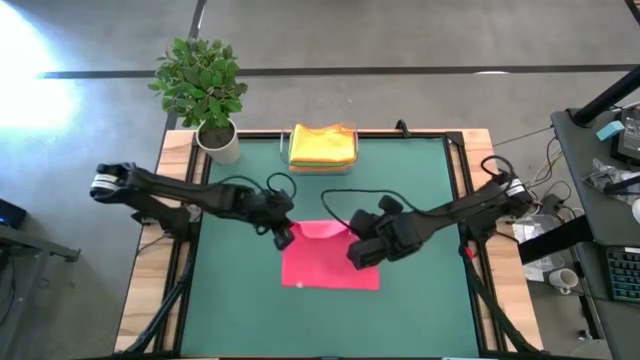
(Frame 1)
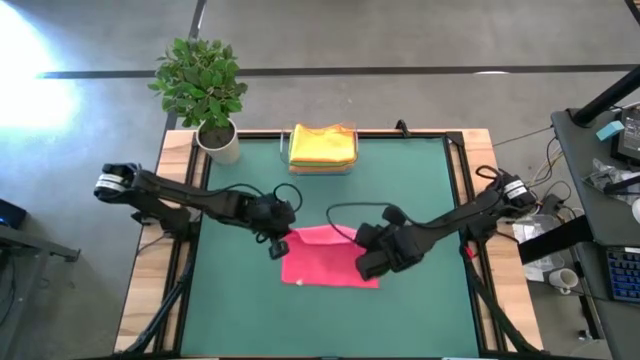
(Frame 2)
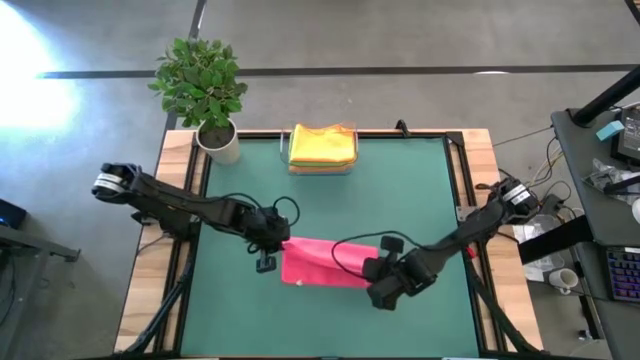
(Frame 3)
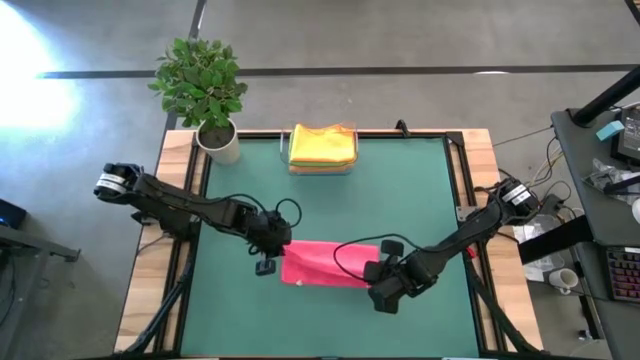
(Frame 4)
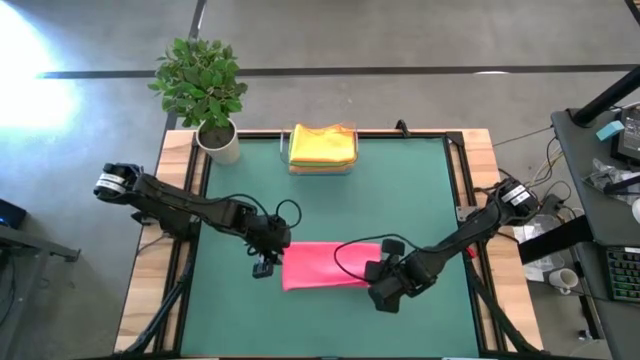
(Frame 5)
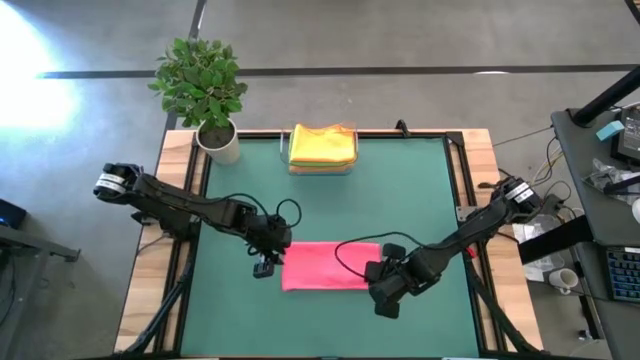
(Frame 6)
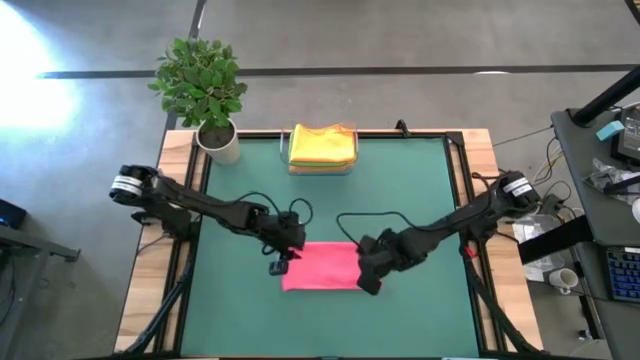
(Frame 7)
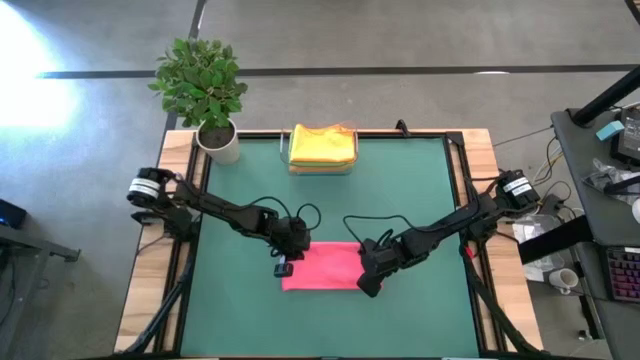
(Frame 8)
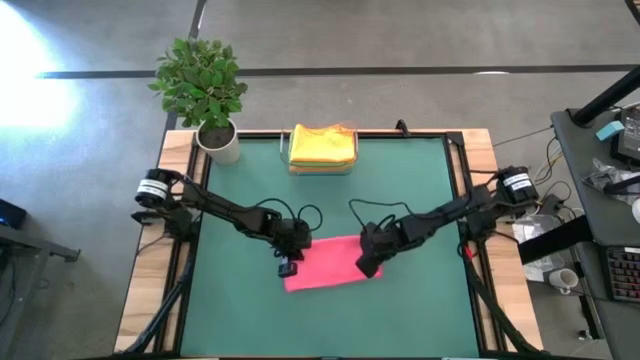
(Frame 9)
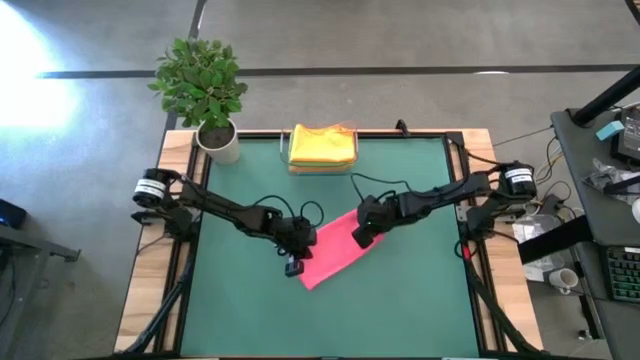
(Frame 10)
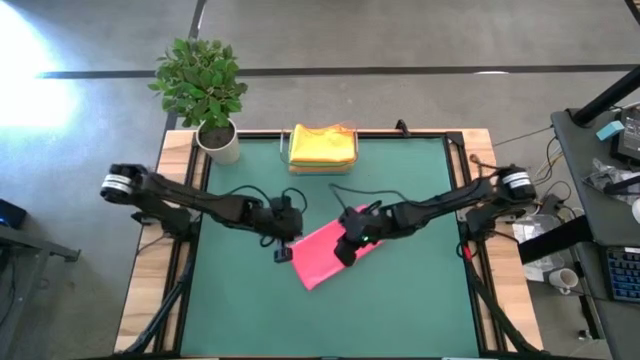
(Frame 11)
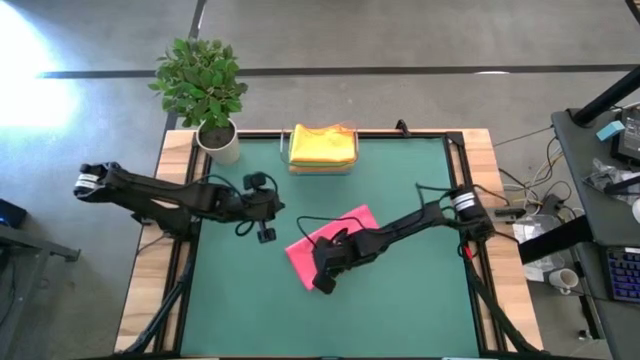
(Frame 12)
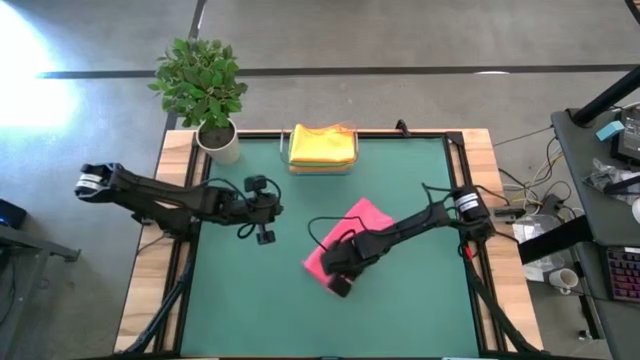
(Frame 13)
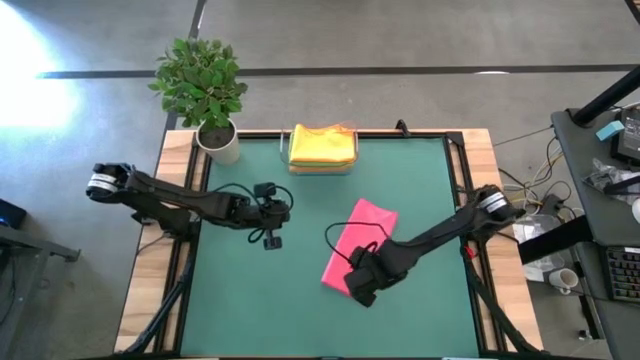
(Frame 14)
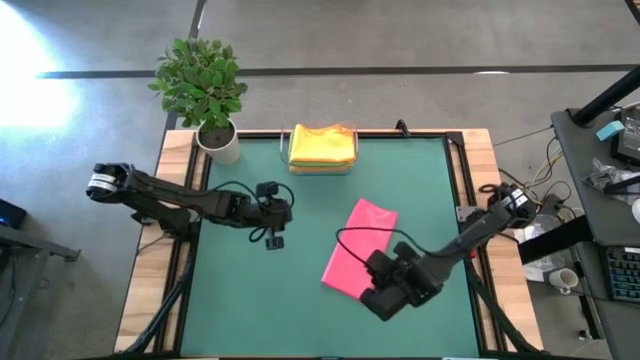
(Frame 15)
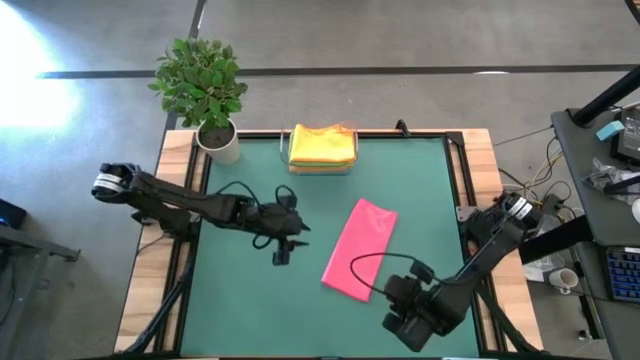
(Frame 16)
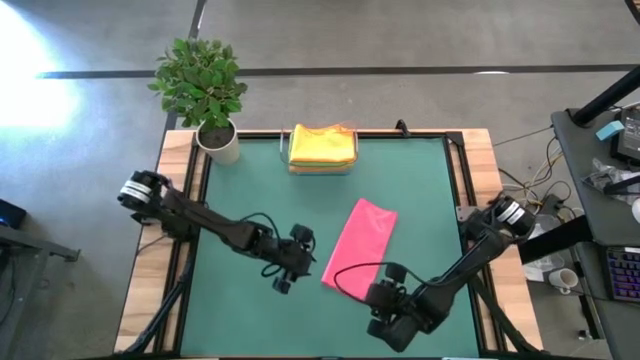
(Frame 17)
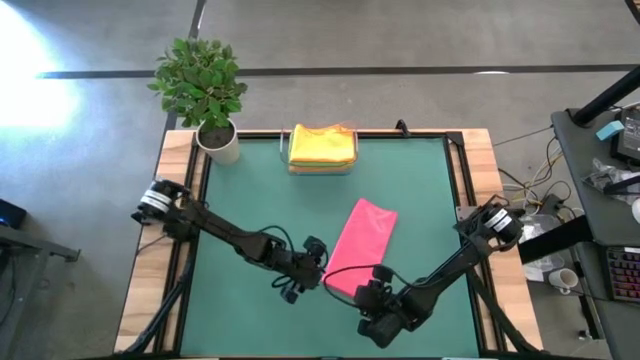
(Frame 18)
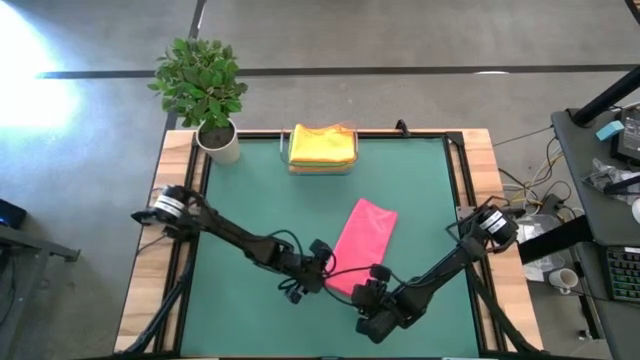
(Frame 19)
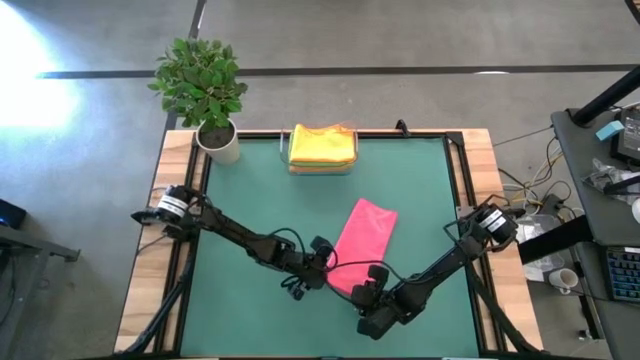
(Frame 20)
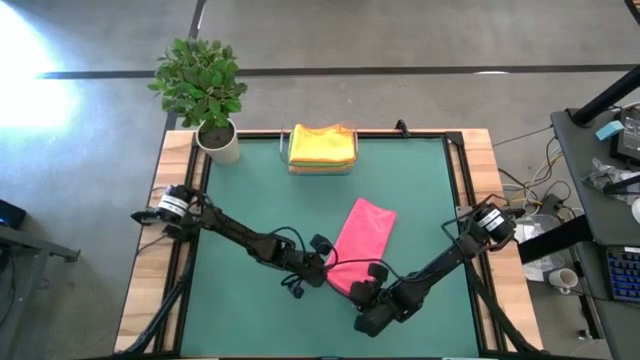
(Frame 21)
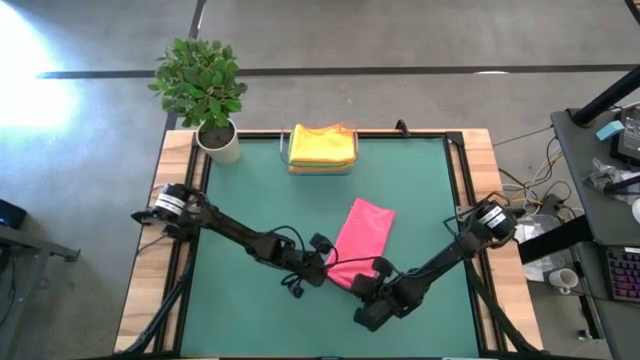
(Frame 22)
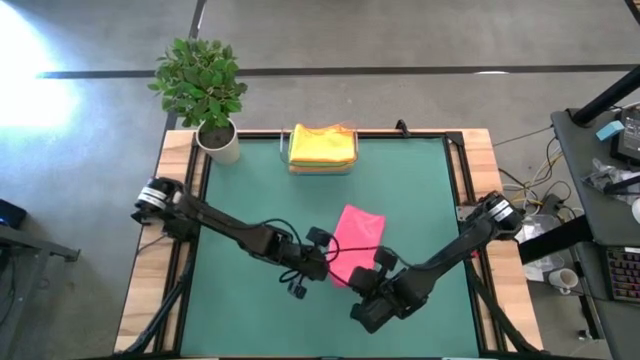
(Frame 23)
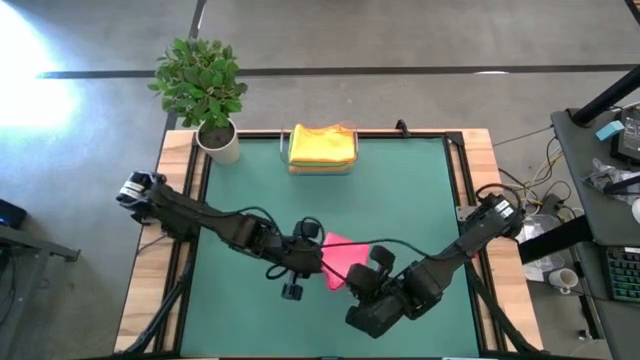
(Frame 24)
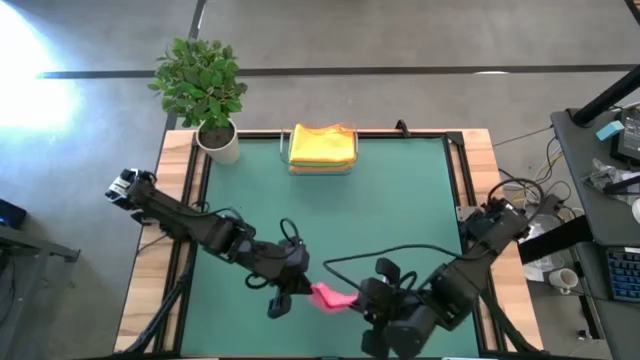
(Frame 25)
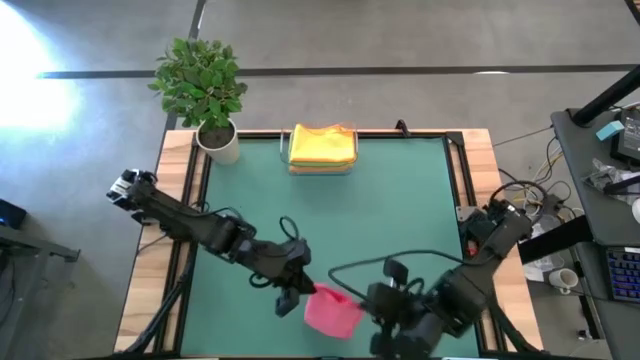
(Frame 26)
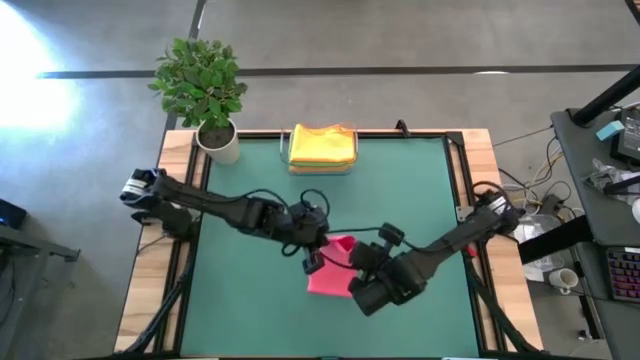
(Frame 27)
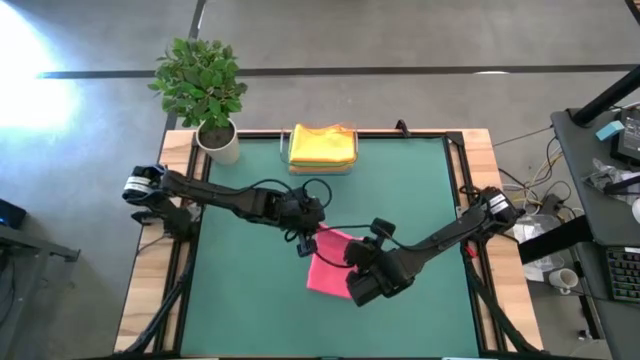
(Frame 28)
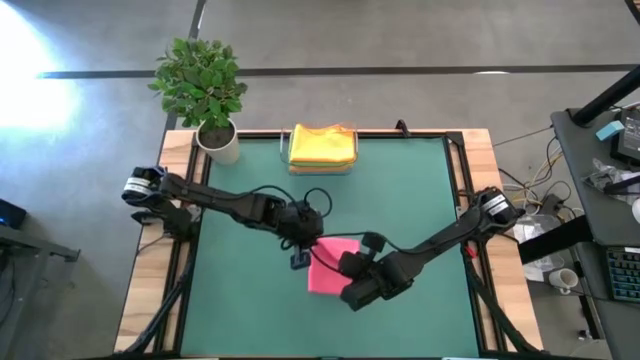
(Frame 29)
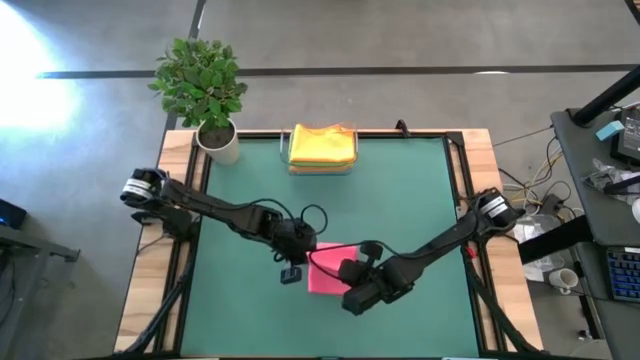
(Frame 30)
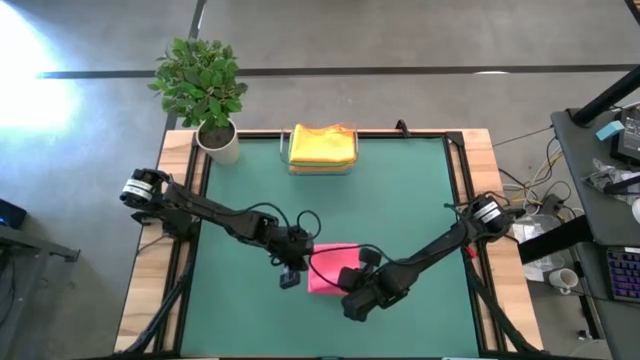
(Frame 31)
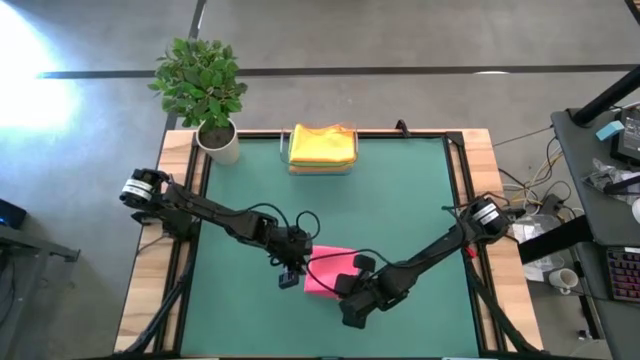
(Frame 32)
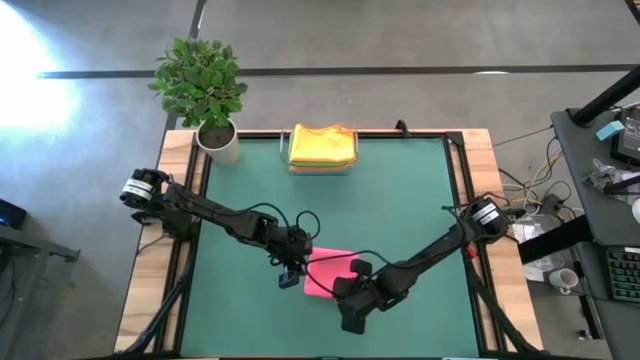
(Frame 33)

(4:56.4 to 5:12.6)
Task: Fold microfiber towels
Fold the pink microfiber towel
